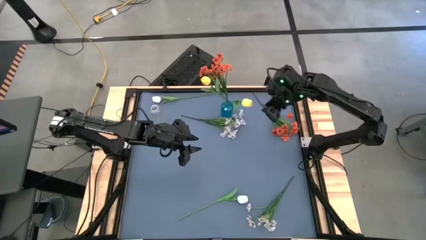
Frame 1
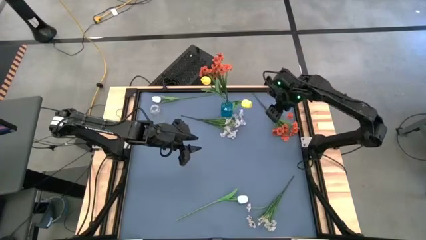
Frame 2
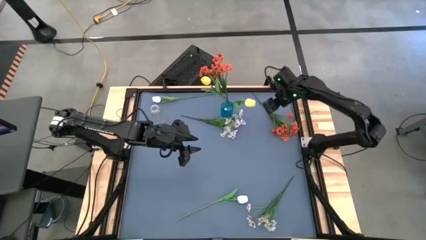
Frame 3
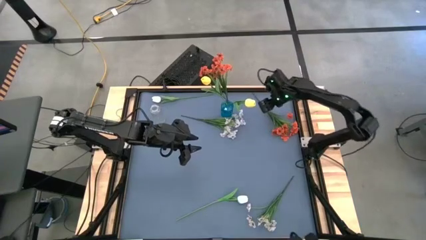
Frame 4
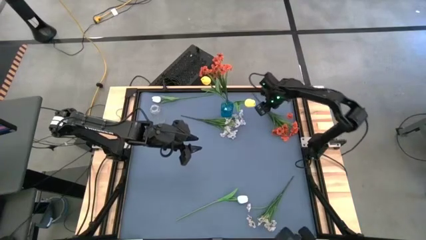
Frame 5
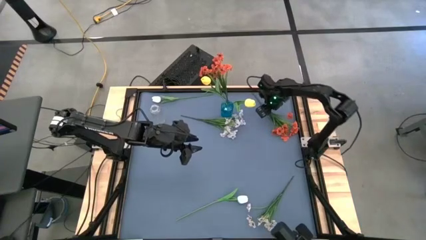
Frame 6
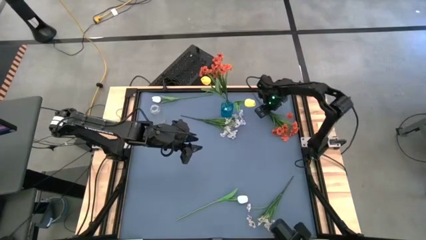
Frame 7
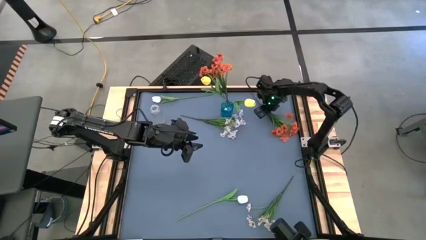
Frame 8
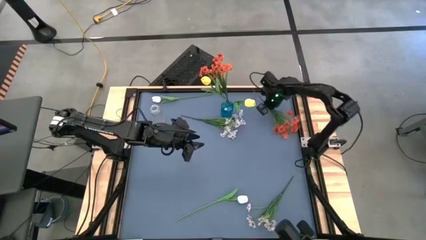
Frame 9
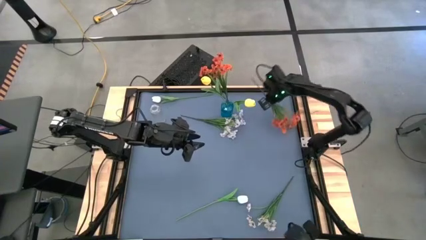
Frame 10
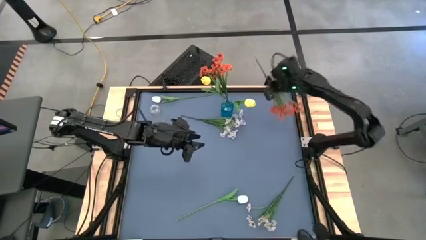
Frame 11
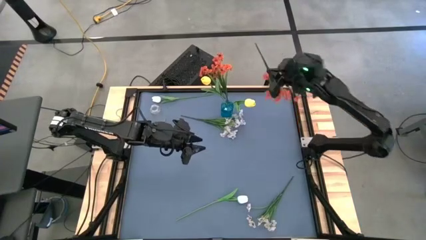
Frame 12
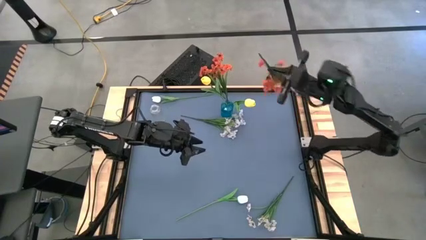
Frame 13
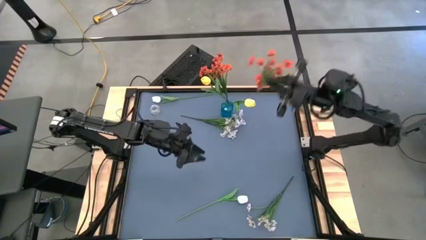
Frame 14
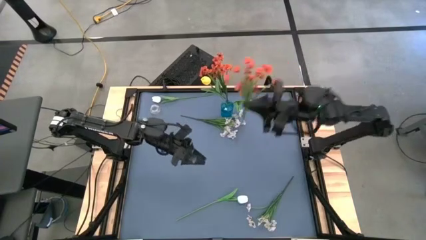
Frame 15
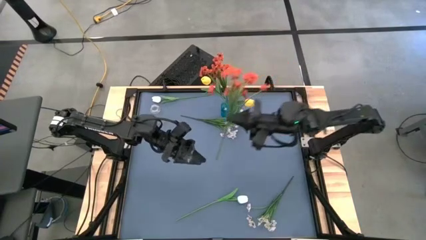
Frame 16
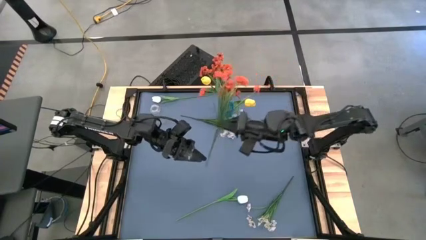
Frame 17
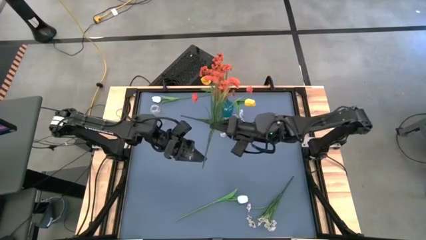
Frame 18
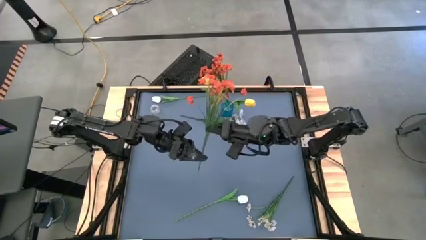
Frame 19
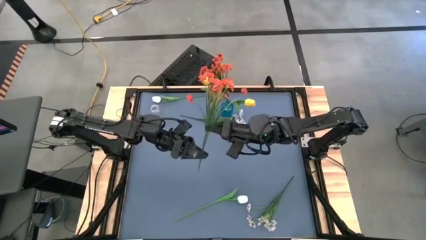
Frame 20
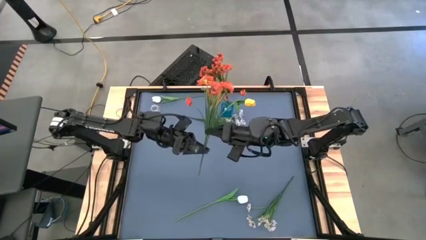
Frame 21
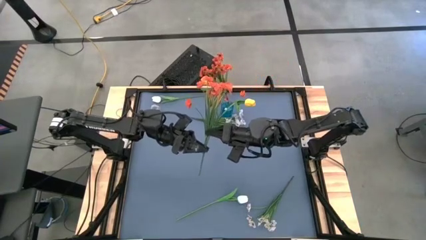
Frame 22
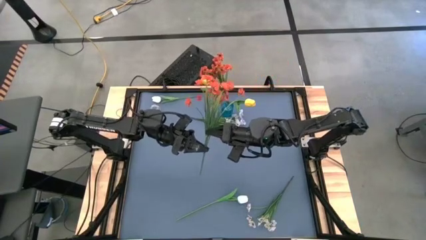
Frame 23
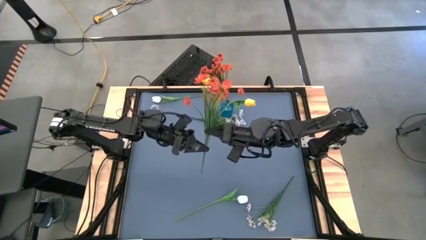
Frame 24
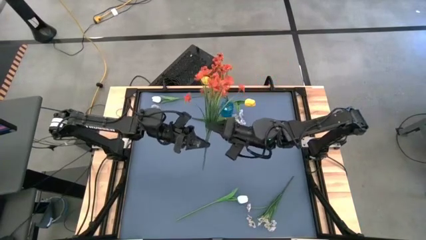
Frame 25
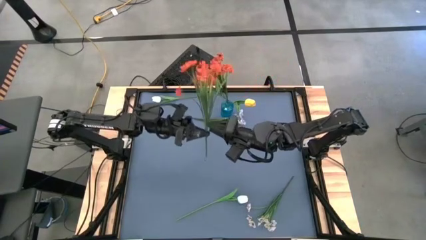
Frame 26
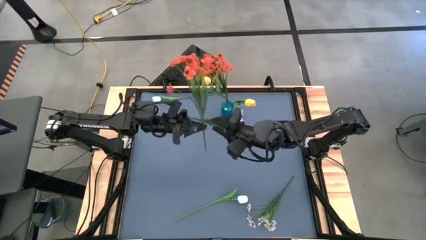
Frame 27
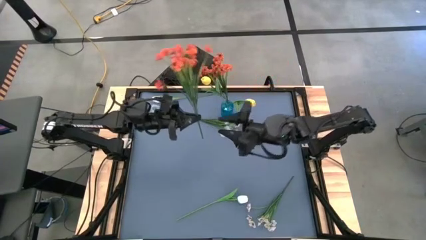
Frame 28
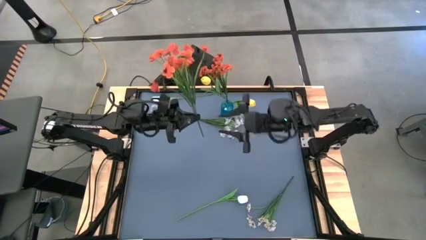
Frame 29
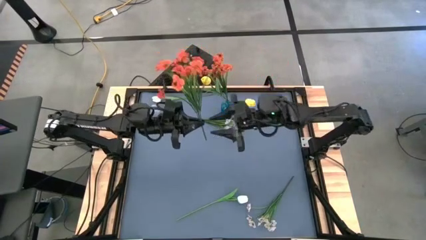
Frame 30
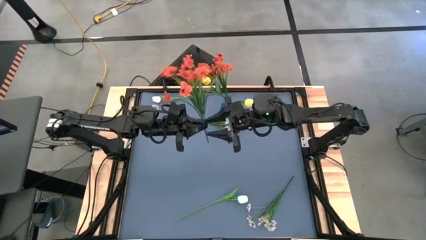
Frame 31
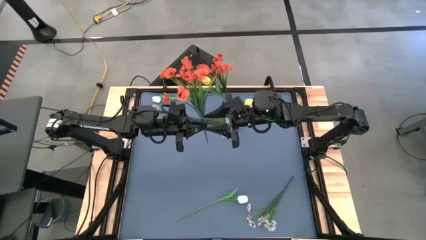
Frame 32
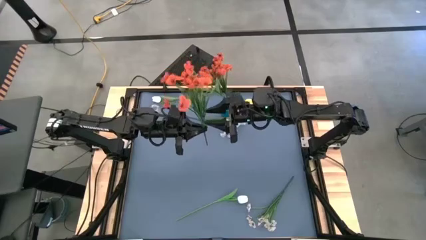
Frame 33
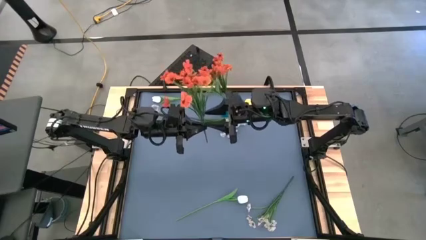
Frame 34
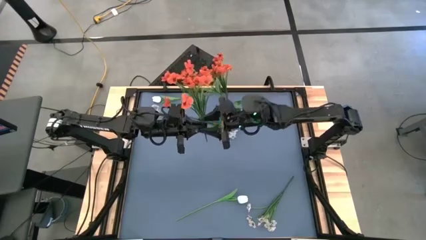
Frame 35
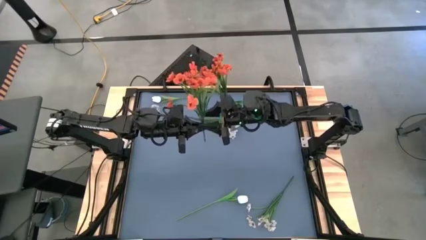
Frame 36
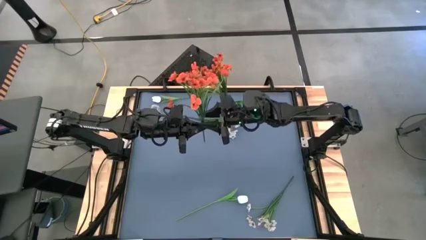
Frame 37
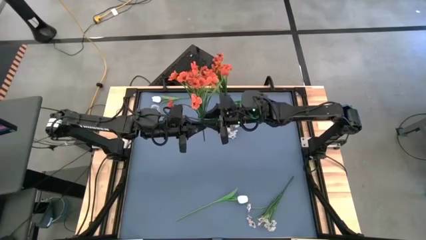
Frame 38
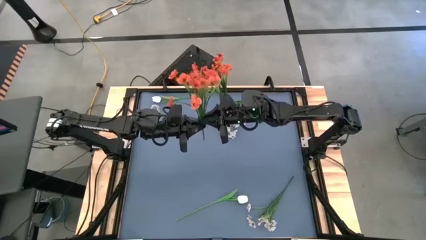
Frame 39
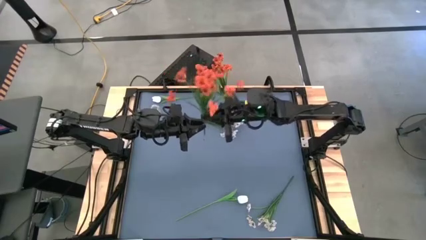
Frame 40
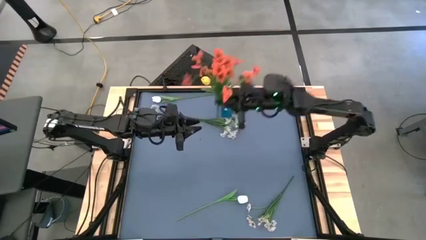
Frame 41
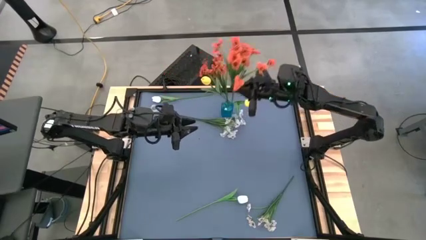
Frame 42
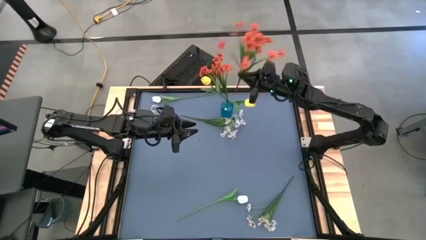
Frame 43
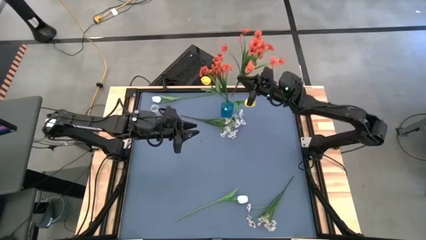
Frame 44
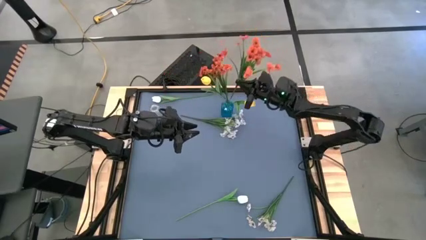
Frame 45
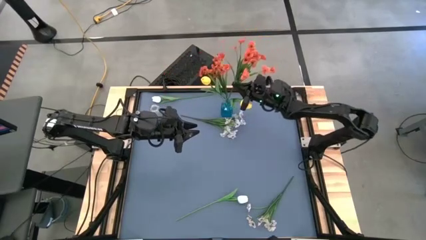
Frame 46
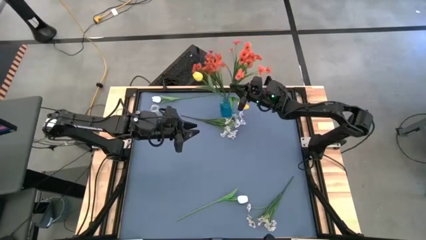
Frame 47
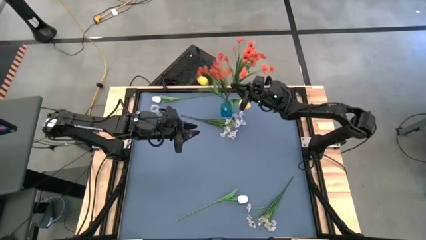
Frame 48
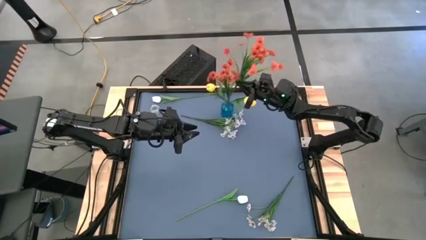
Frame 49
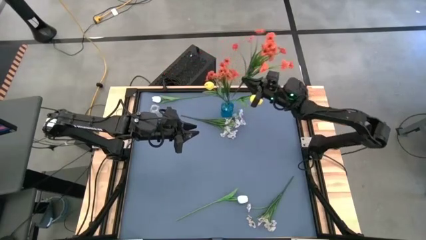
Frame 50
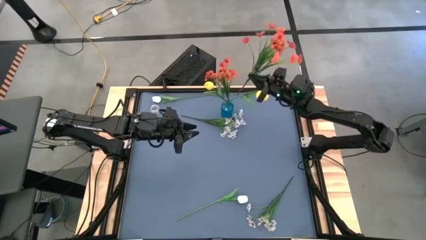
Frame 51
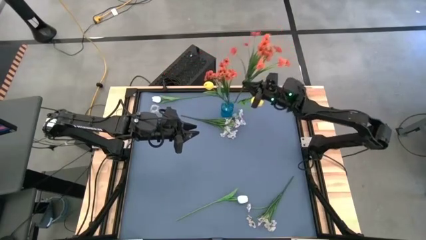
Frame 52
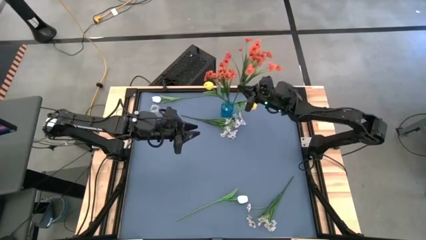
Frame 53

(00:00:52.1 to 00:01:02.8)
Task: Sort flowers into vase by color
Put the orange flowers into the blue vase

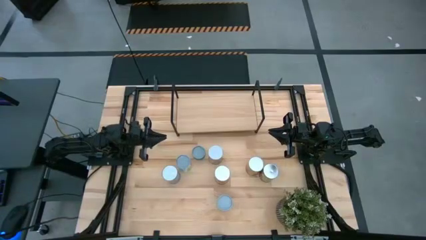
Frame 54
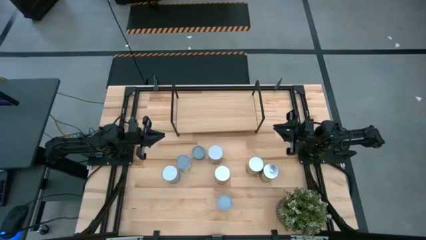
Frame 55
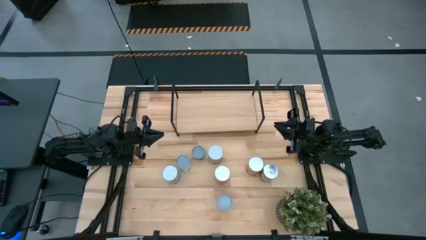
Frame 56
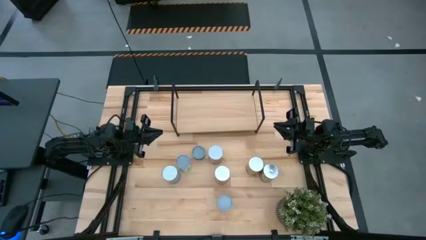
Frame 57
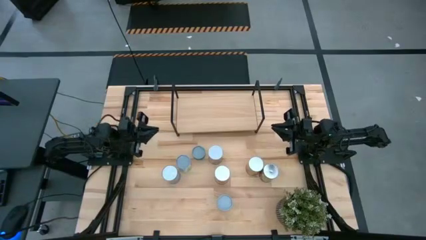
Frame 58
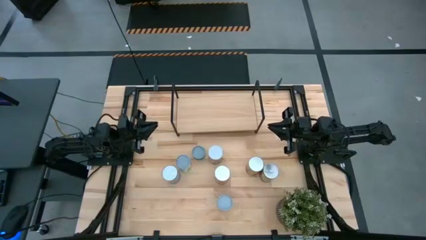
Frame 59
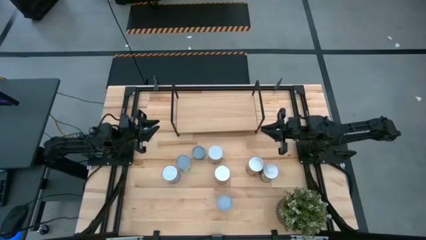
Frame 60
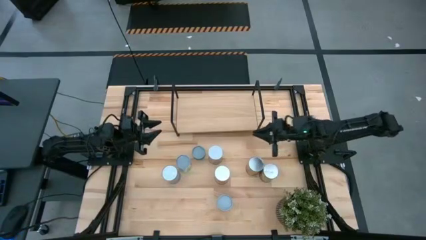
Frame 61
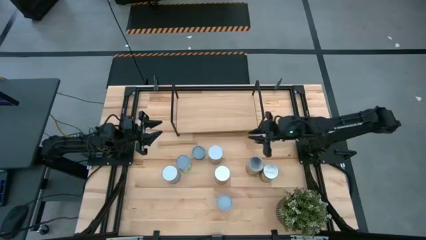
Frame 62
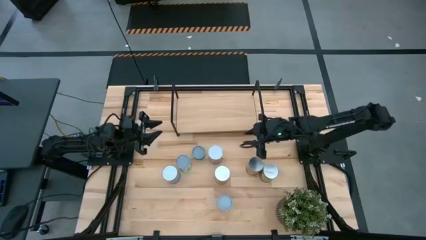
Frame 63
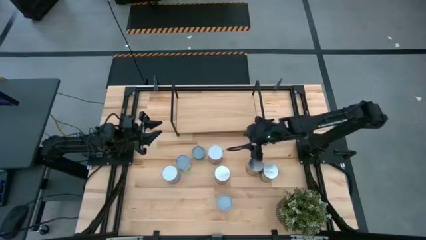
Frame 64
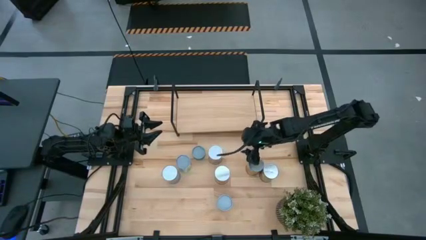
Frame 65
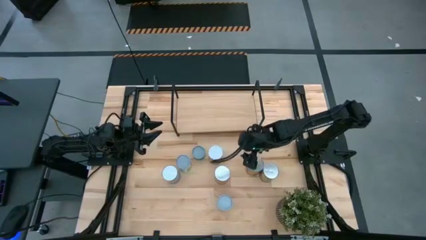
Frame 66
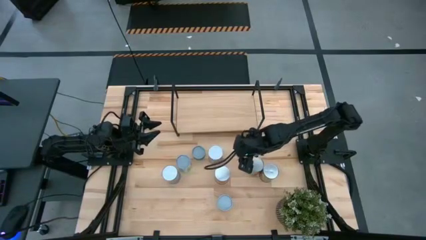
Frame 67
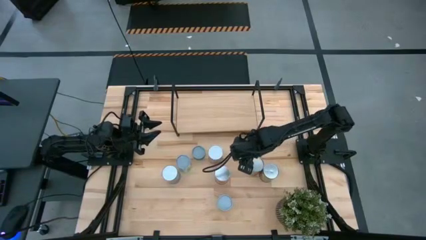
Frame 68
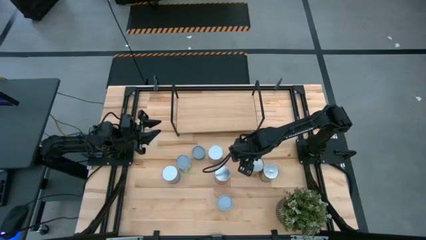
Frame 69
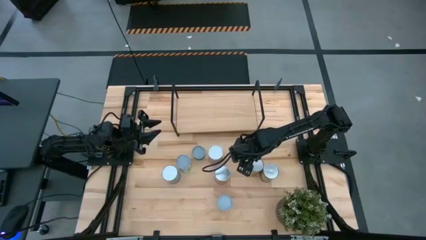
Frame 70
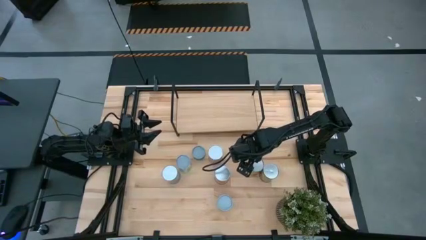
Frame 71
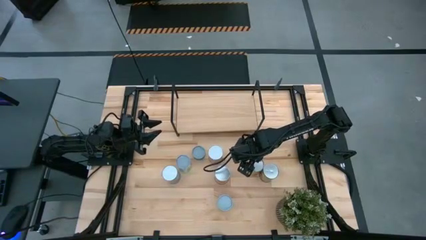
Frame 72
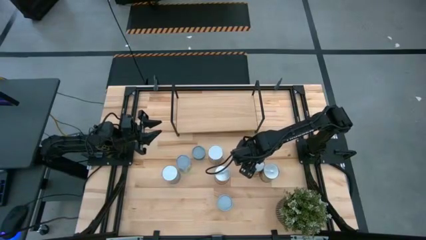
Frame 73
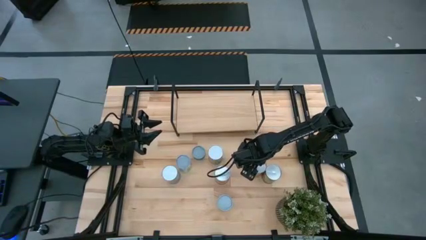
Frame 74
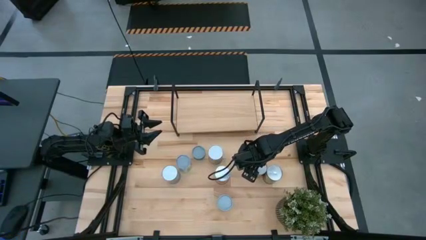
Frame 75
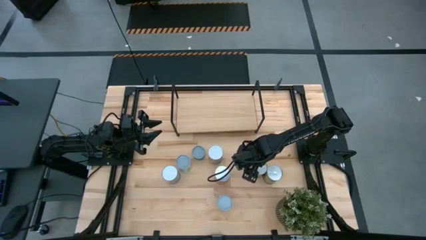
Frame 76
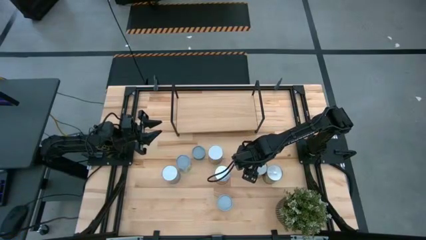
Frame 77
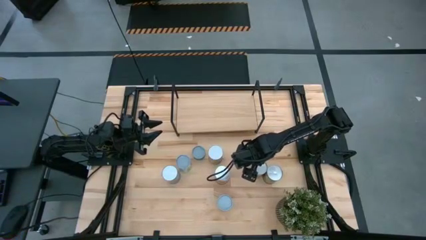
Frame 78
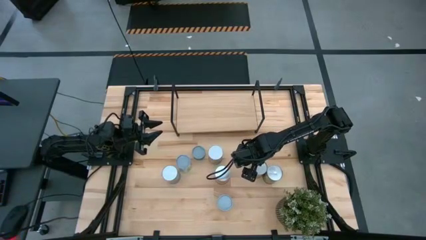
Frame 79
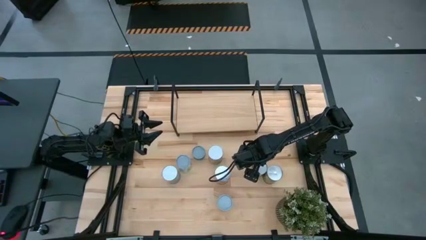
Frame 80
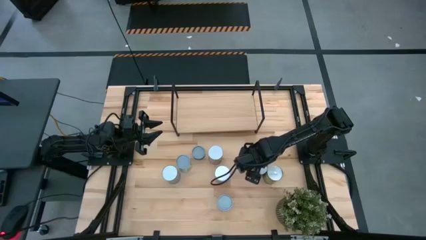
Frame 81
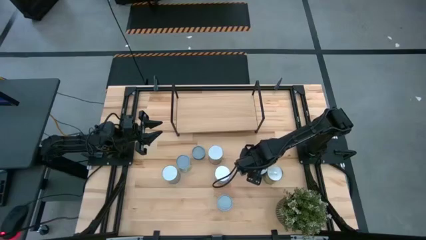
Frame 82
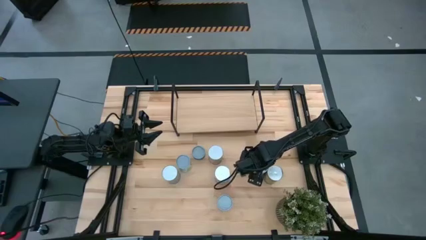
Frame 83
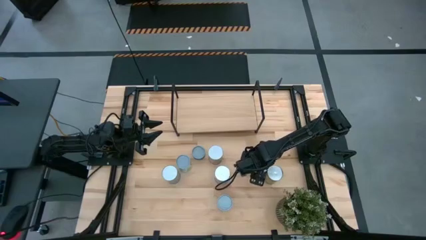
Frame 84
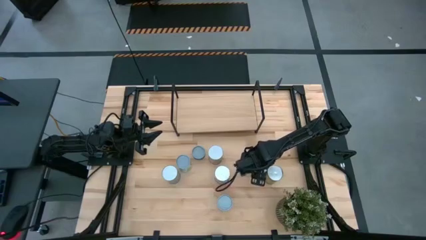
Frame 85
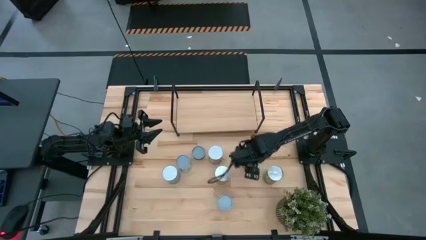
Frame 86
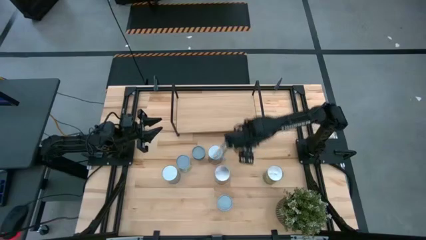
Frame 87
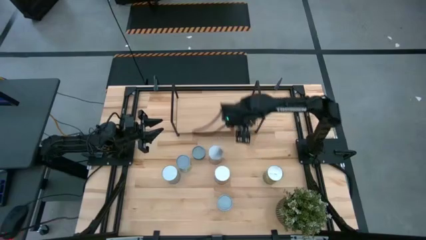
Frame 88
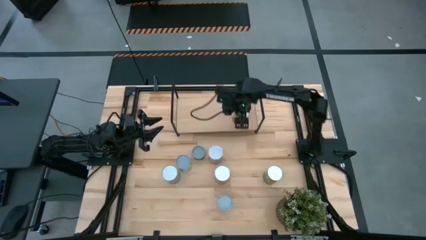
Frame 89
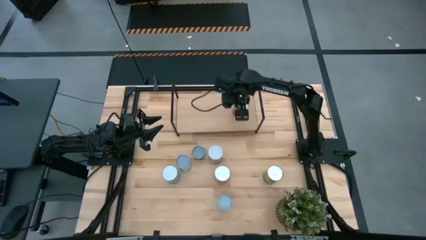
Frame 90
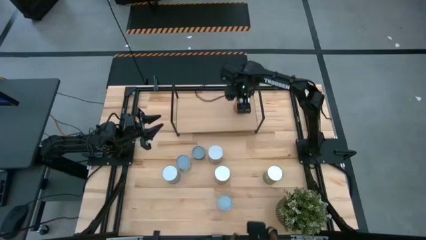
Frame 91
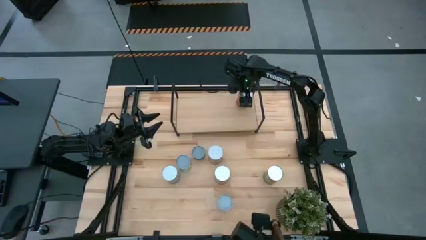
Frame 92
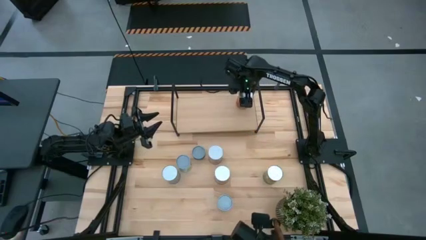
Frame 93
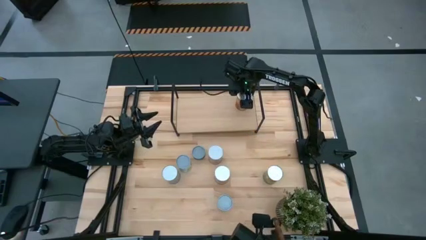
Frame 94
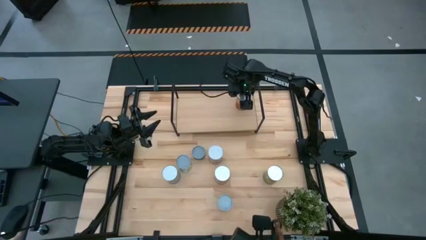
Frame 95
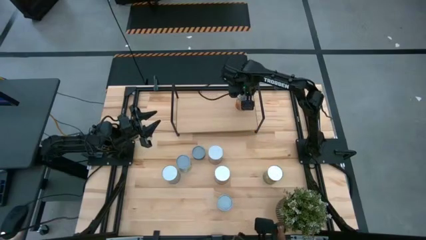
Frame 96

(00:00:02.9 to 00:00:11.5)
Task: Pick and place cans onto a shelf
Put the canned pineapple on the shelf
